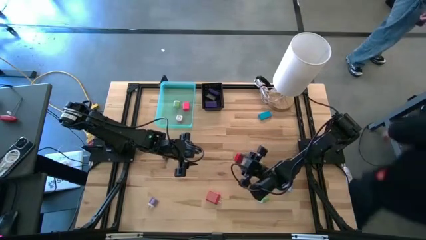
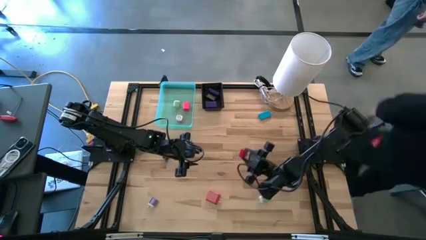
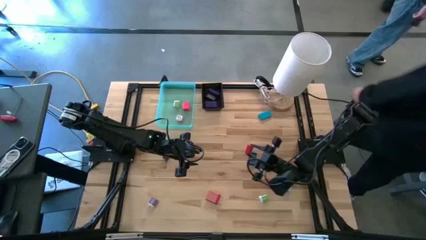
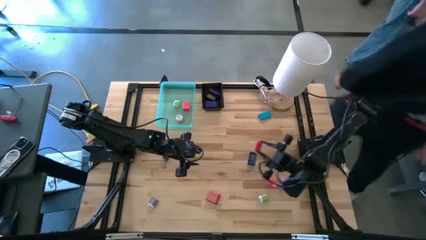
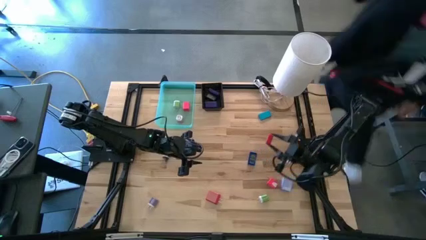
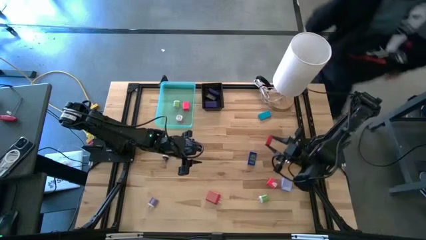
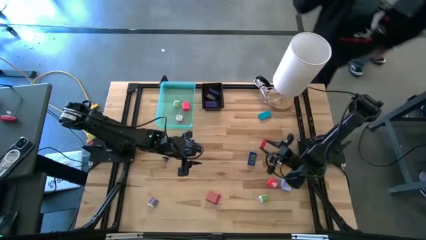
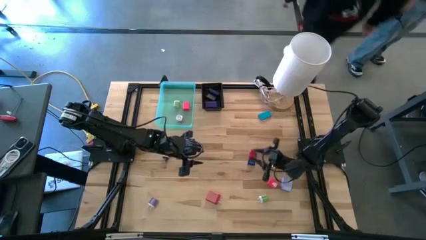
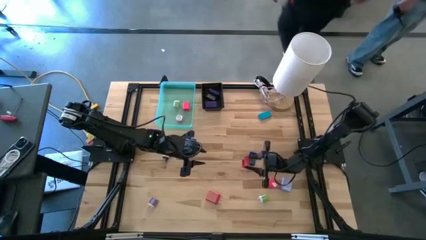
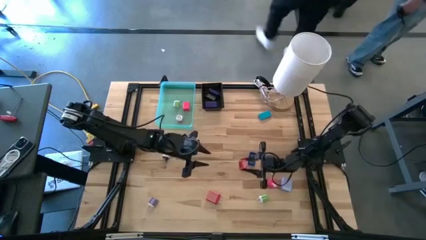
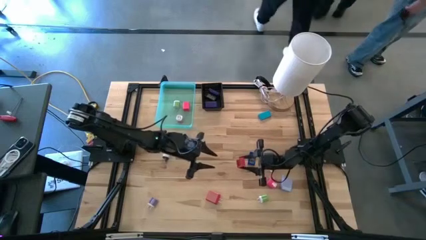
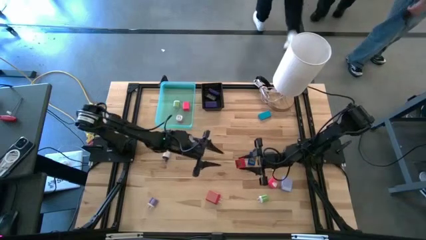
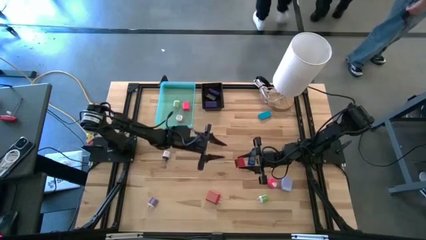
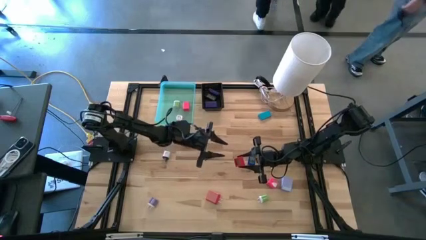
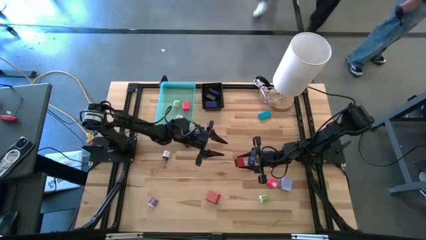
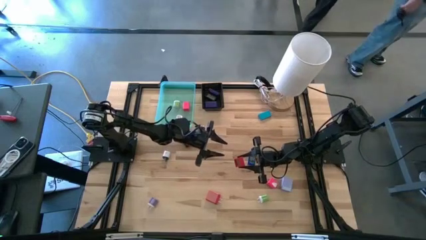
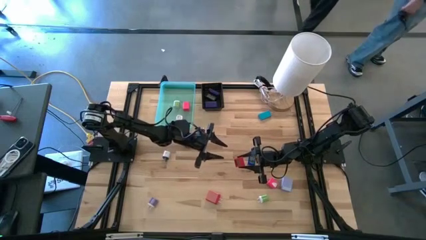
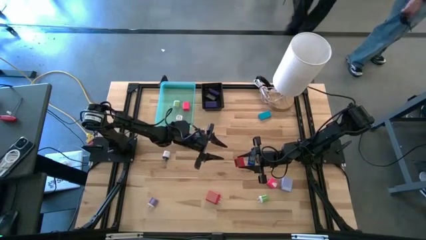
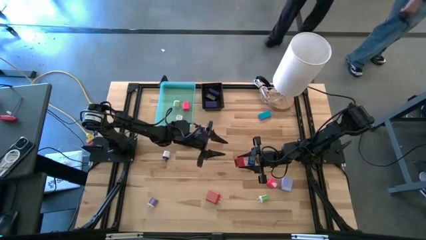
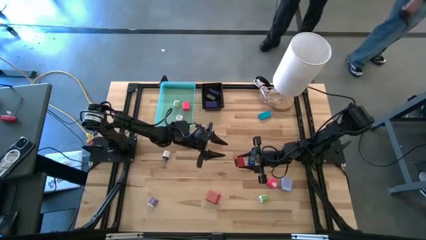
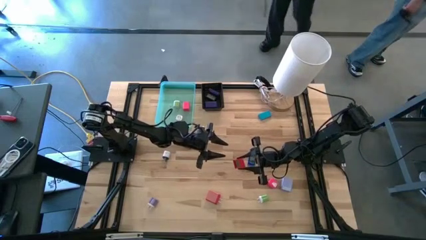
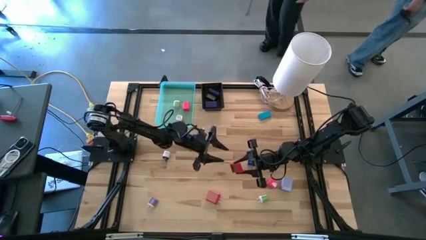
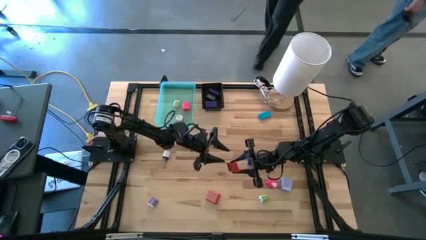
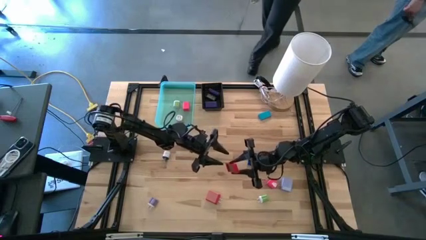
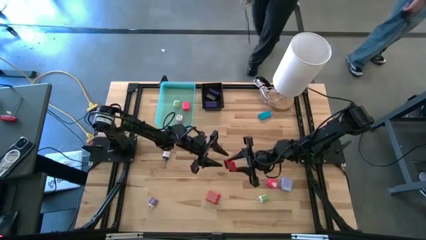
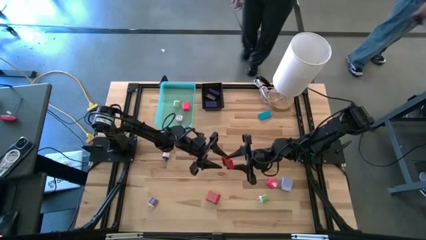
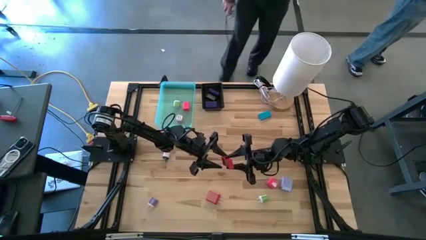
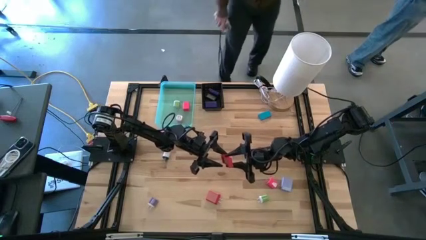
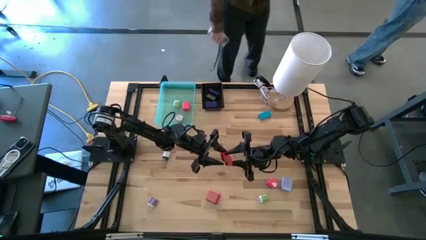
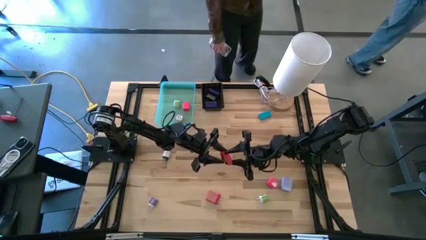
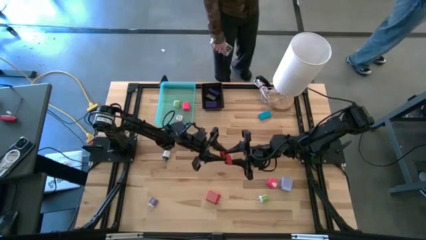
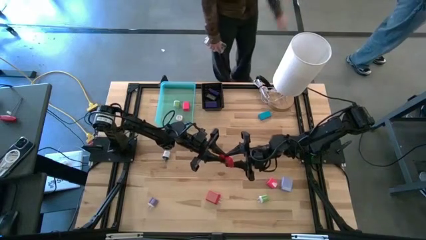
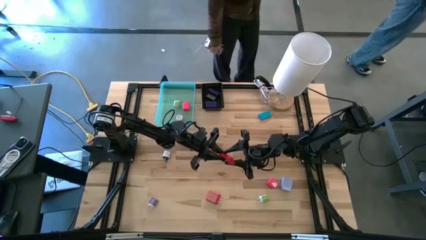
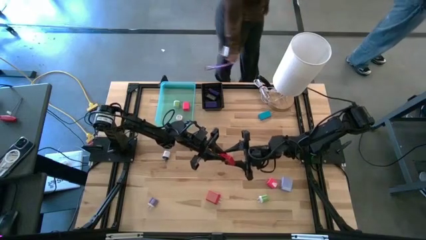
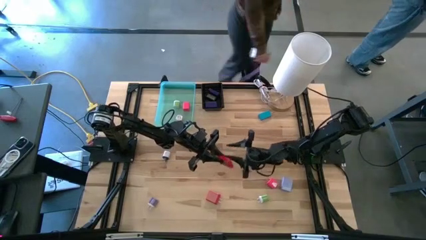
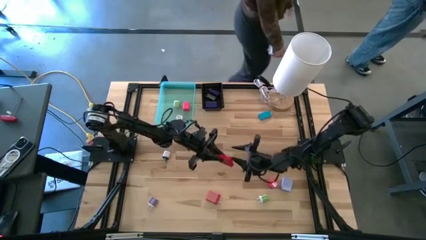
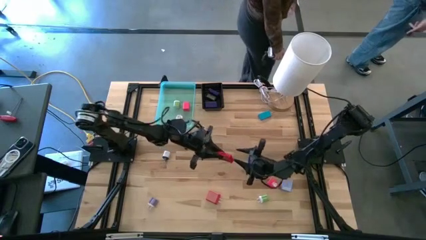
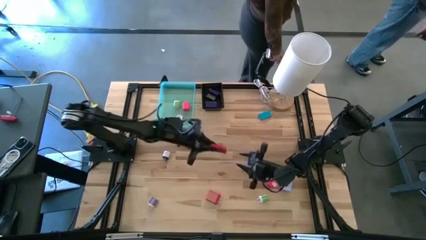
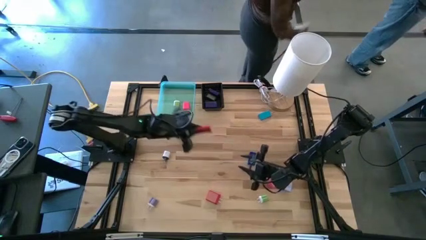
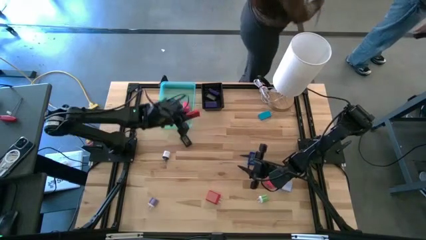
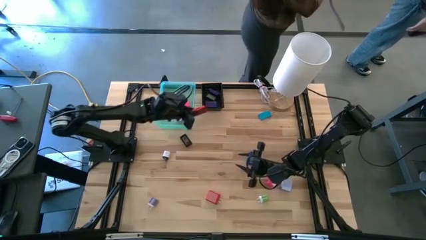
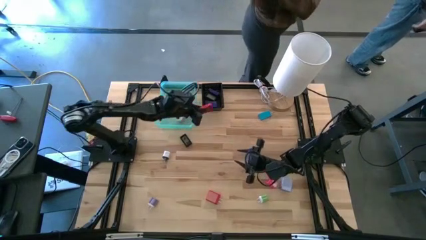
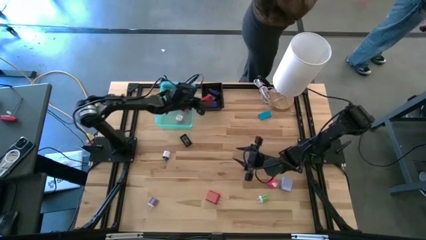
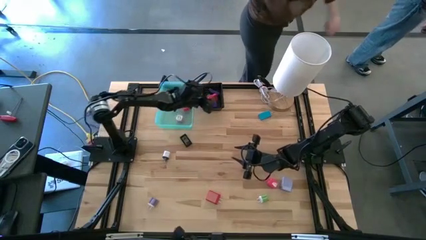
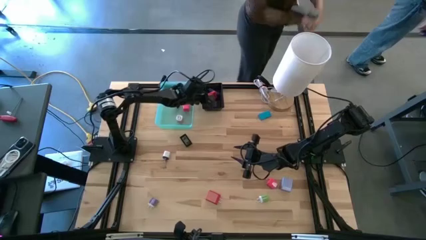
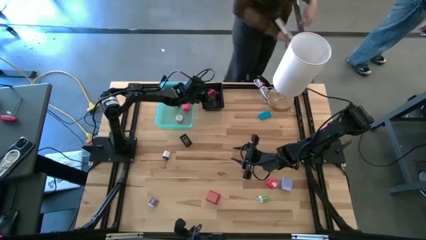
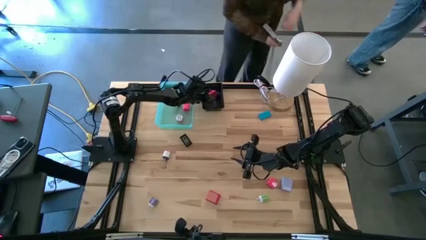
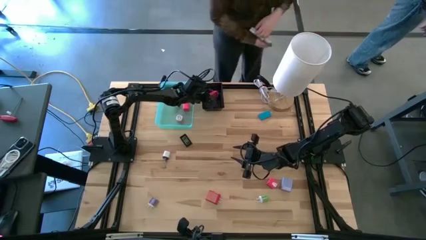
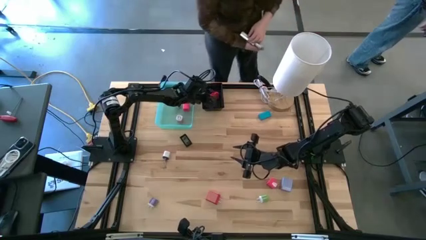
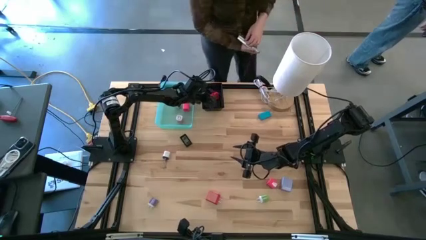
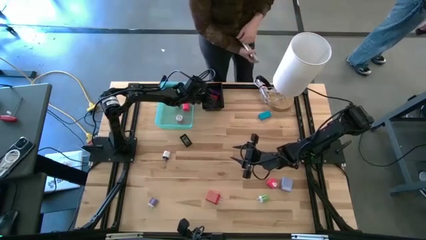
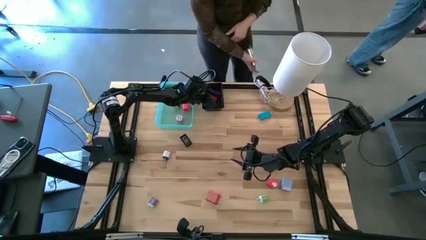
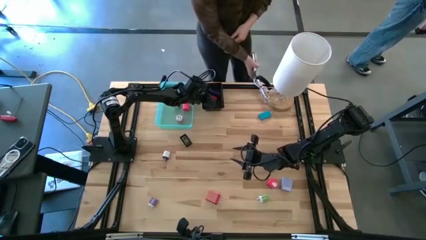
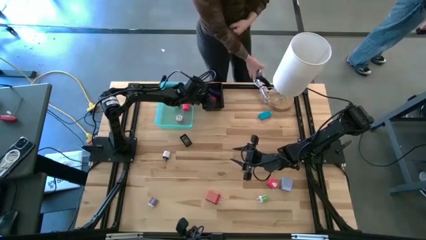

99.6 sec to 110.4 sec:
Task: Pick & Place Office items
Put the red timer into the black bin

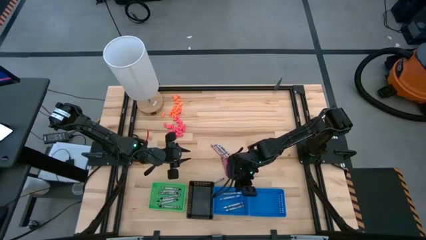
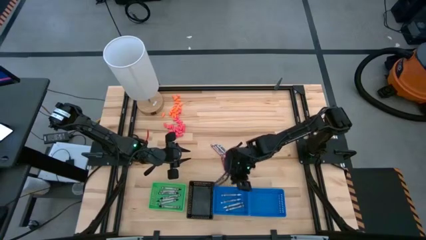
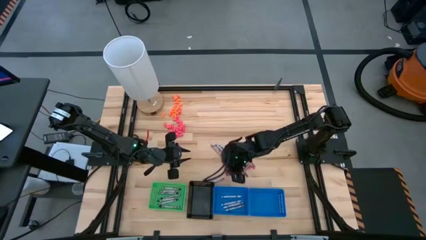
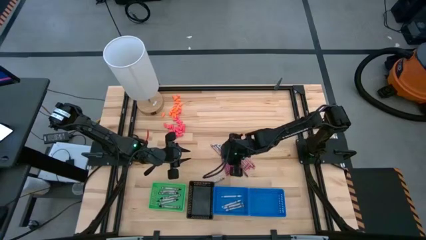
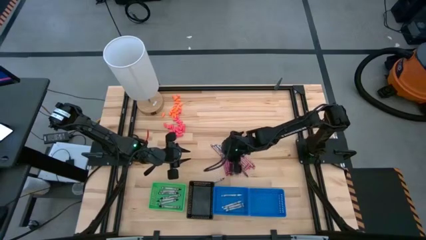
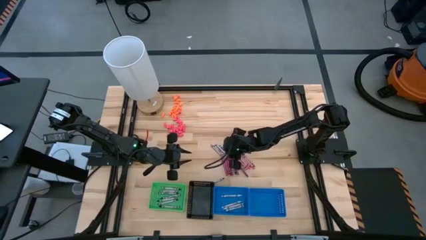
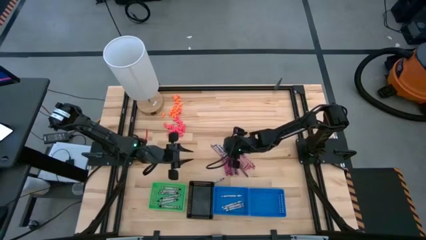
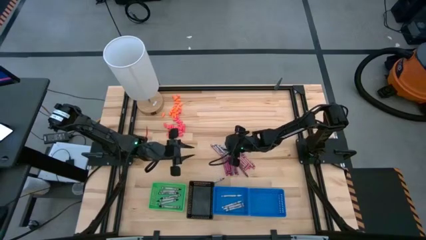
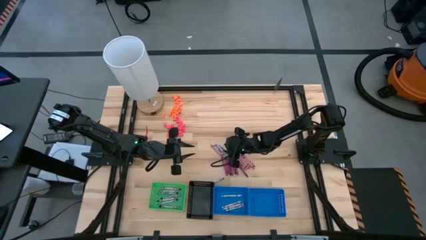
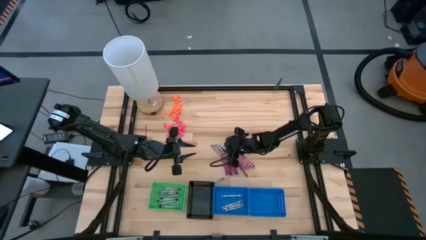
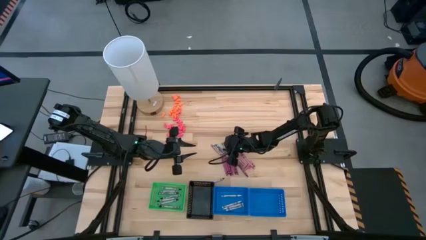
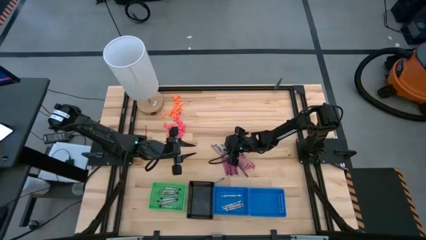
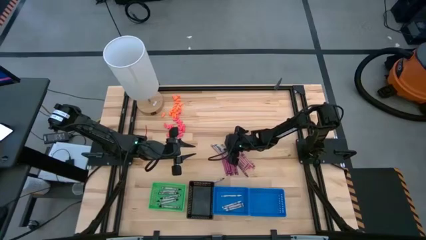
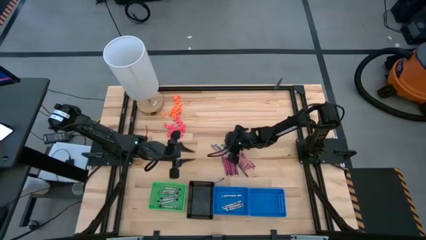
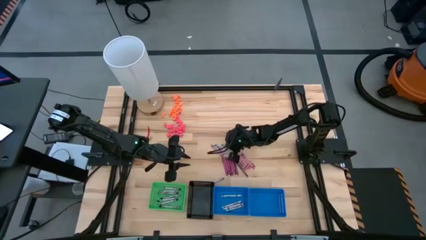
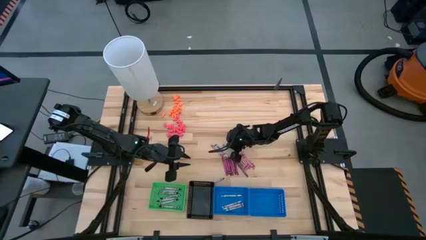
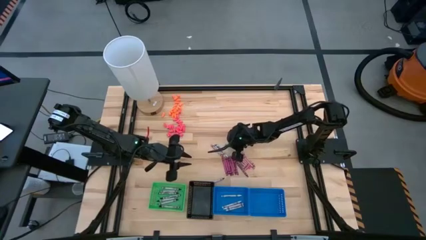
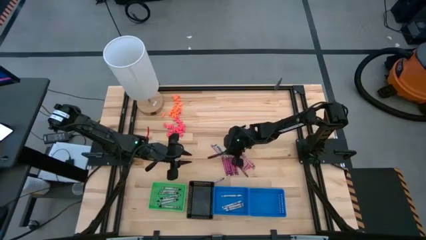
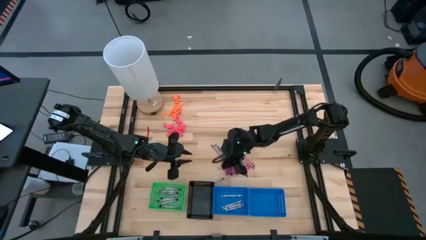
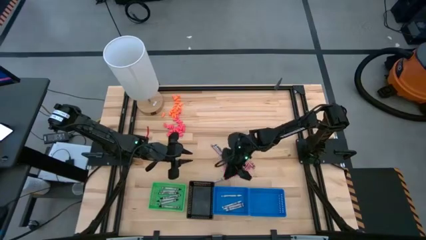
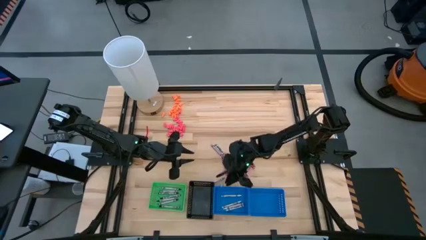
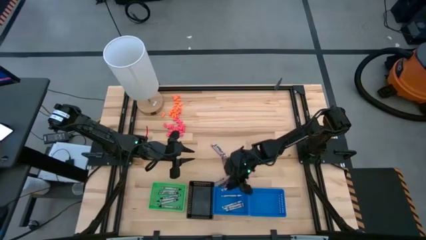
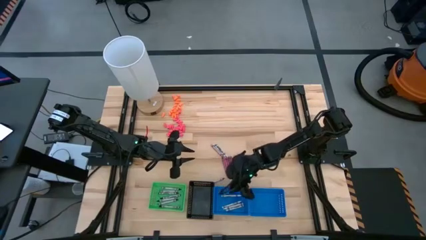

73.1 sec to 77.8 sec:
Task: Sort crayons
Put the white crayon into the left blue bin
